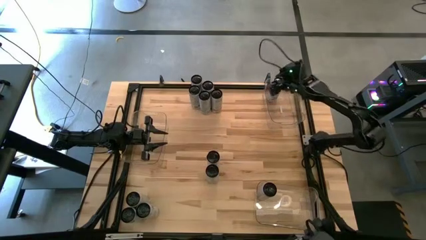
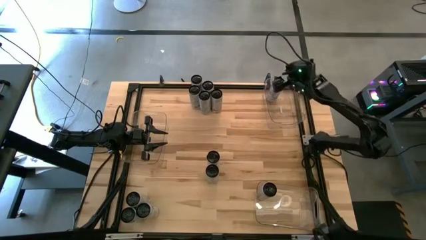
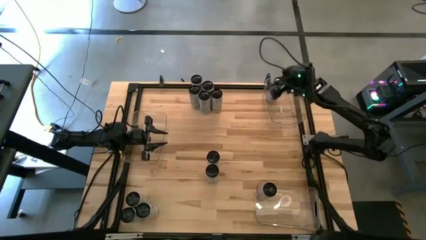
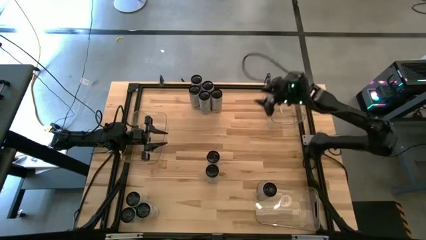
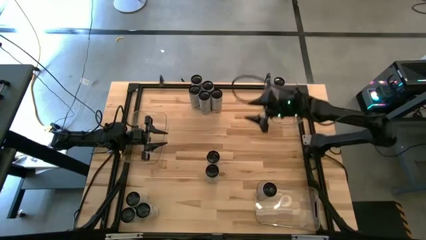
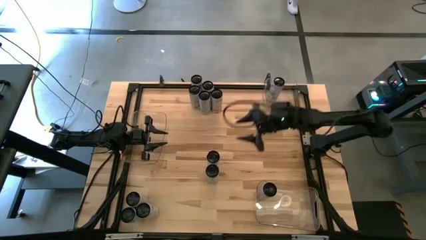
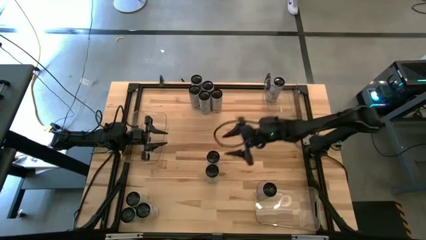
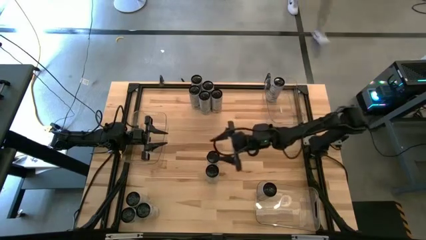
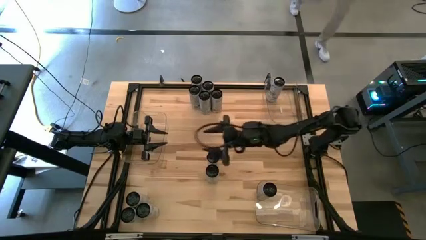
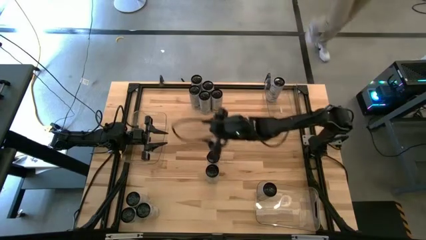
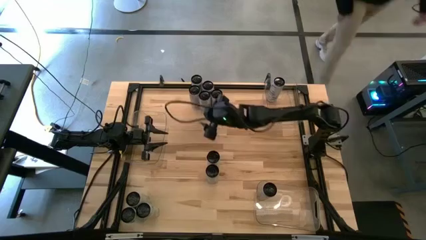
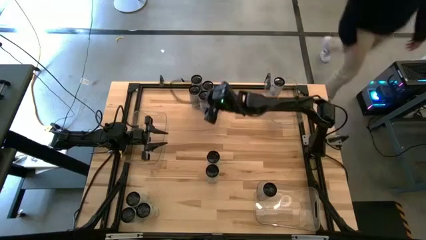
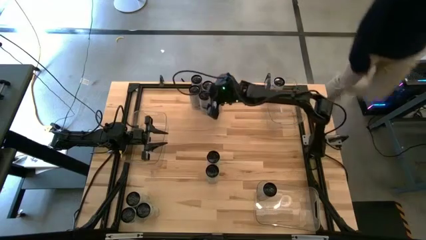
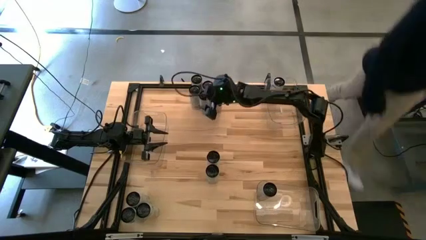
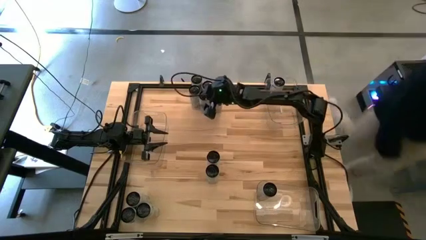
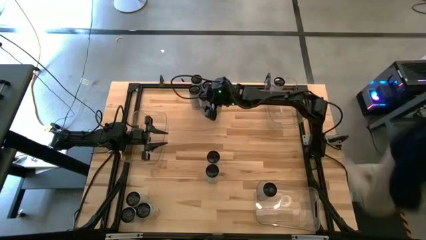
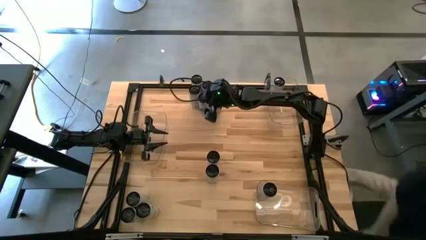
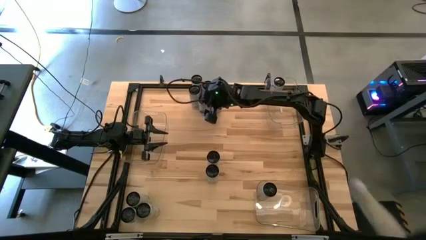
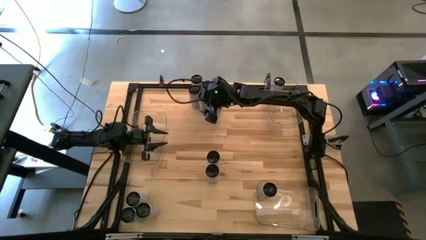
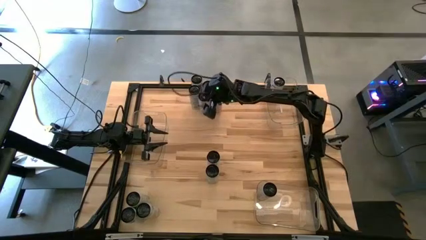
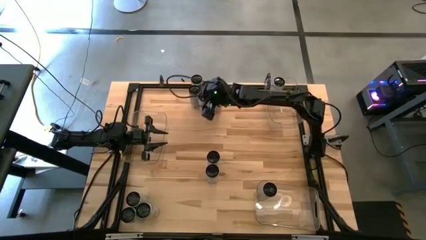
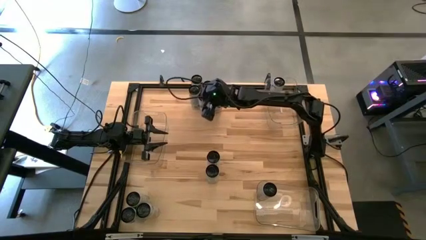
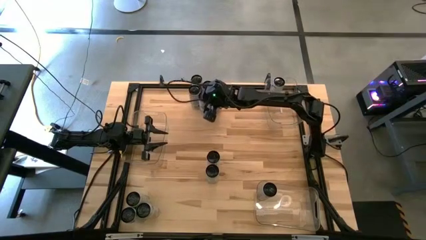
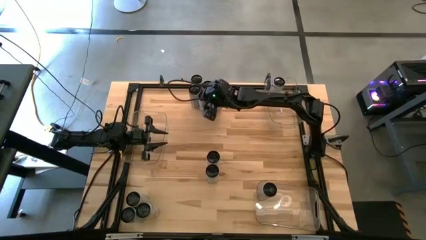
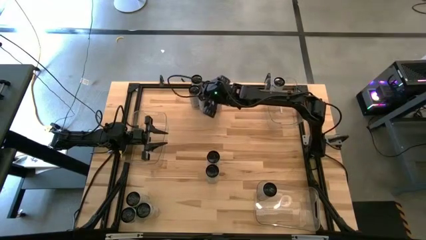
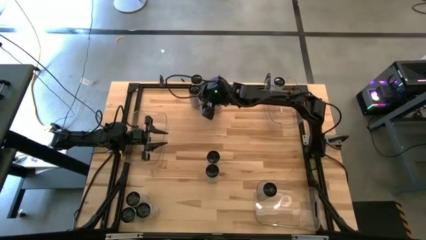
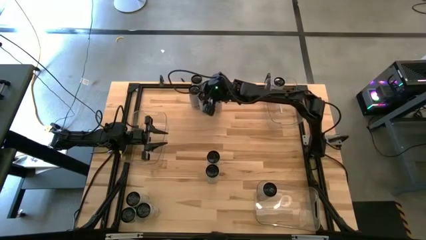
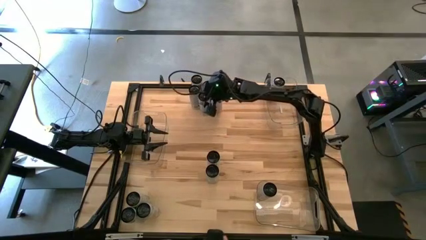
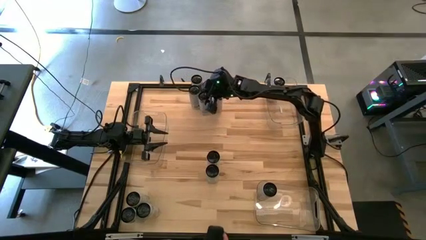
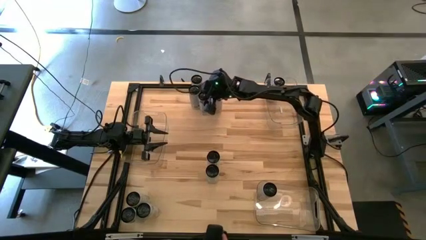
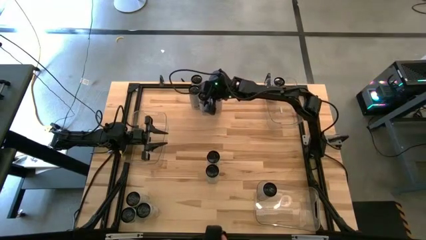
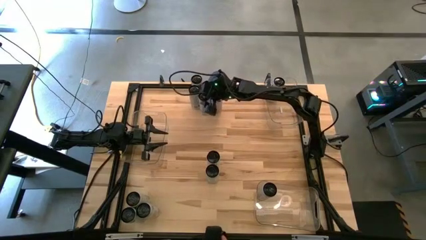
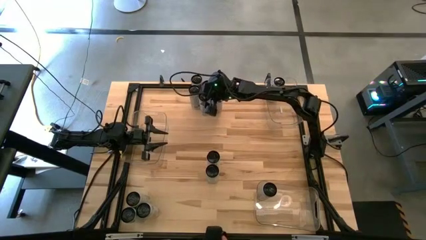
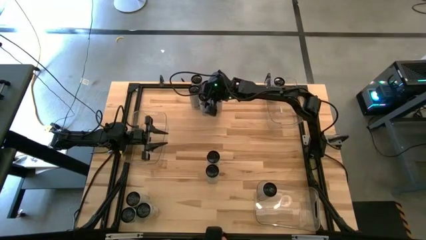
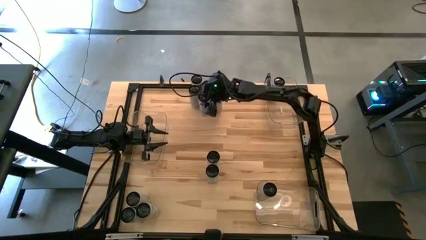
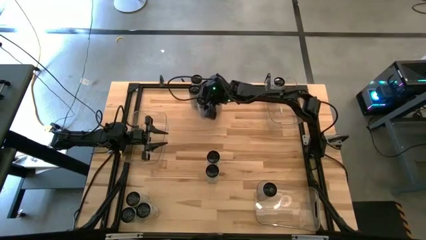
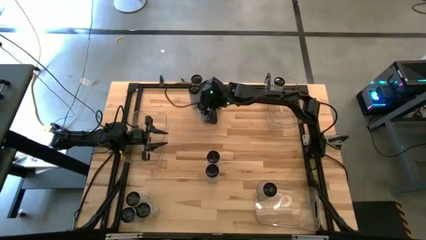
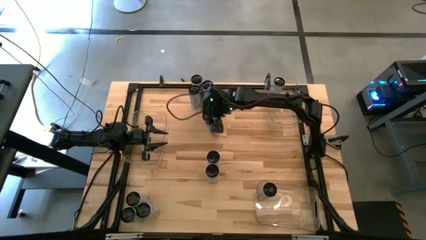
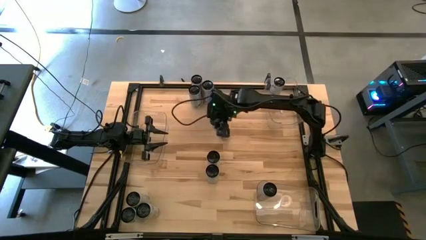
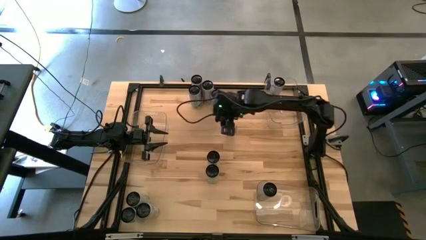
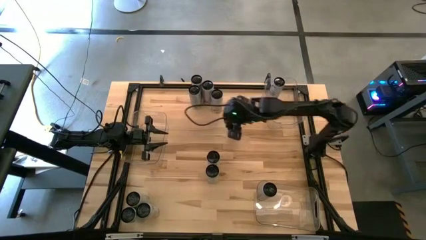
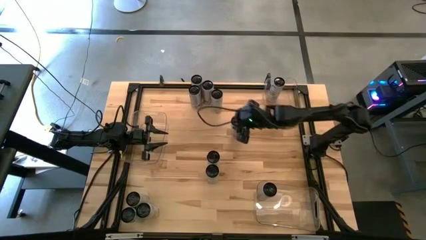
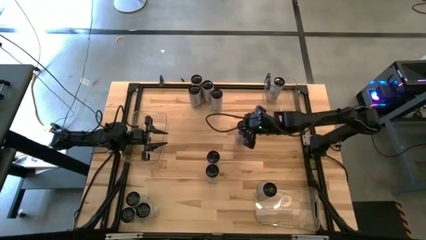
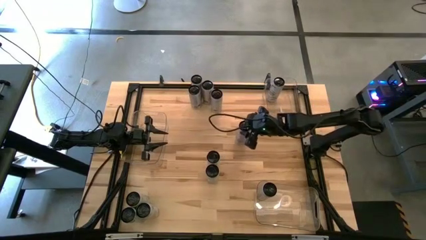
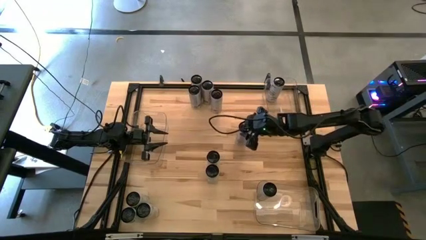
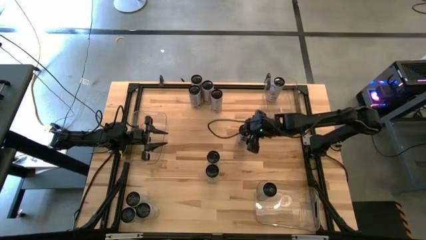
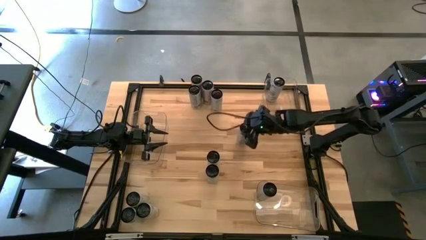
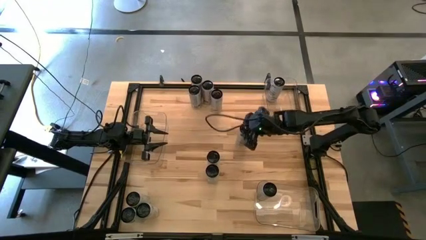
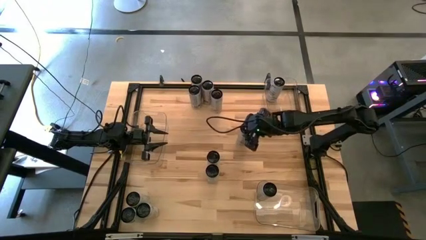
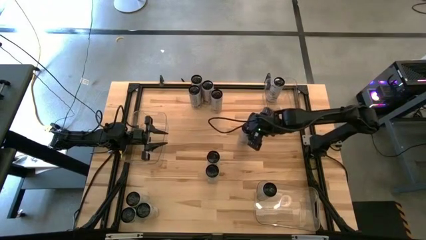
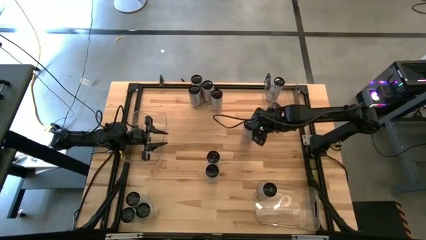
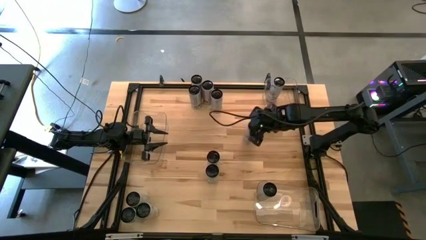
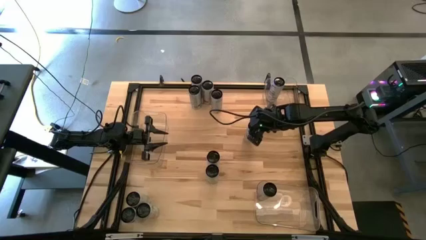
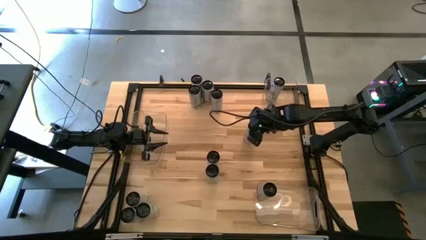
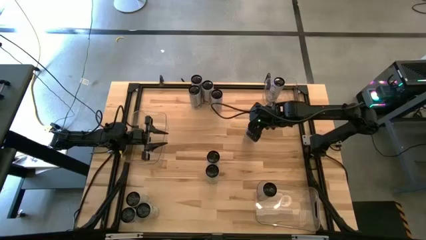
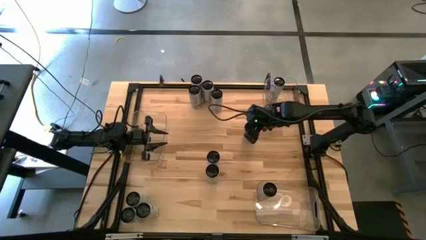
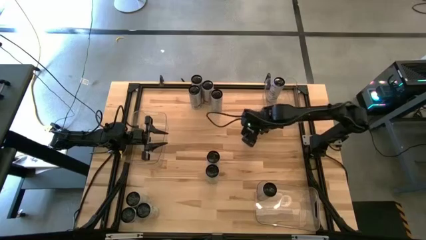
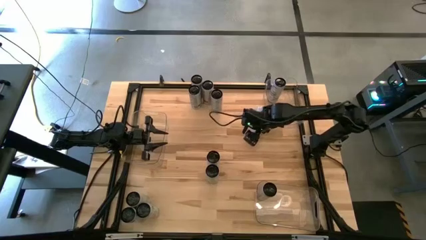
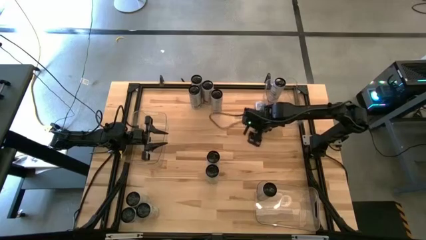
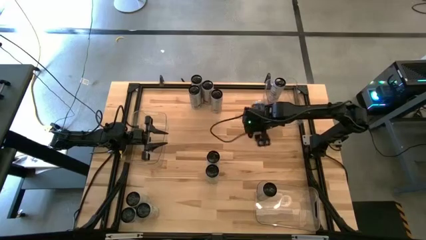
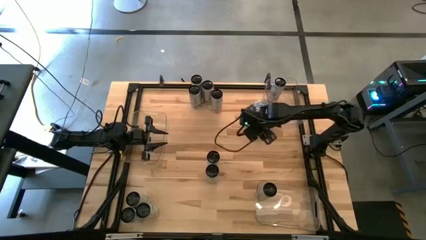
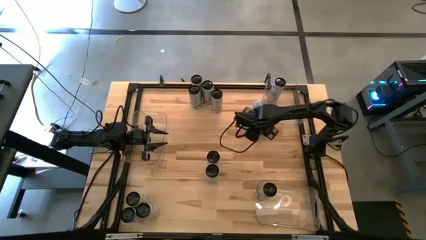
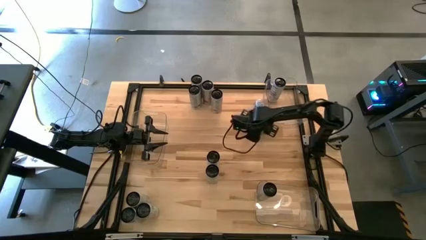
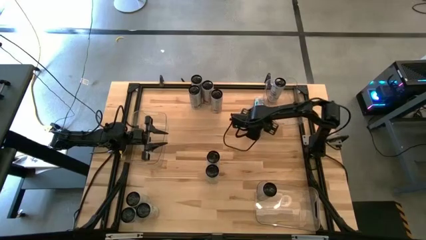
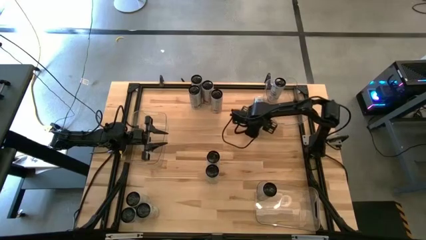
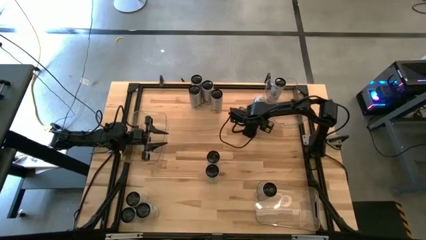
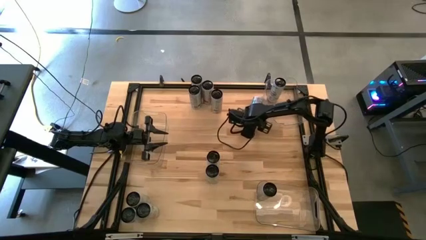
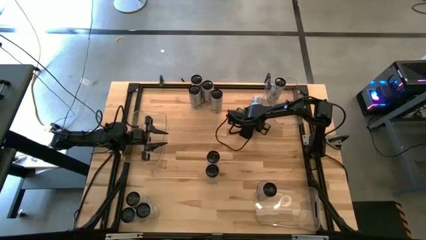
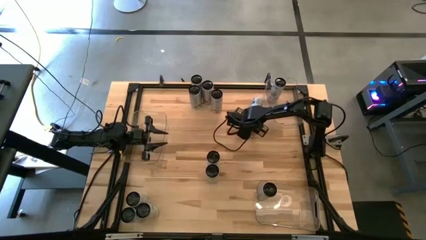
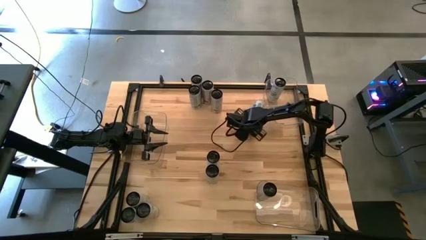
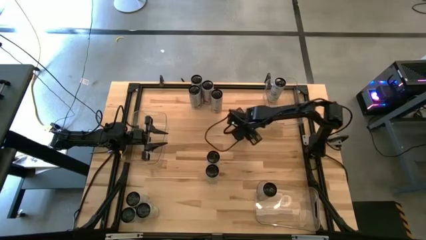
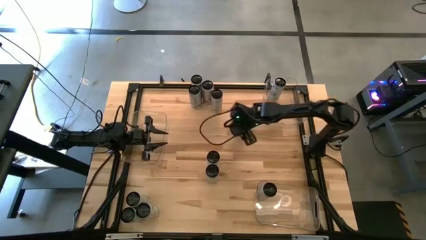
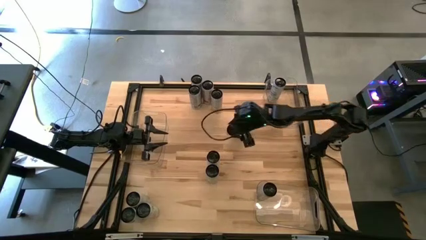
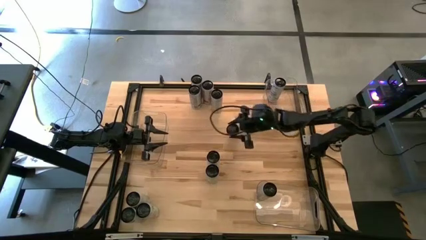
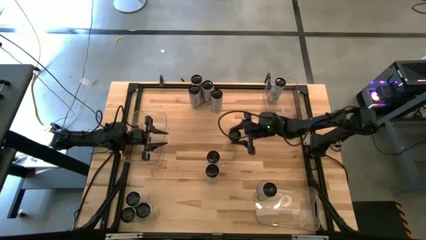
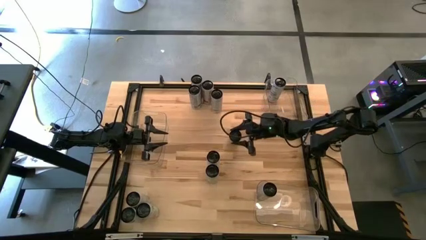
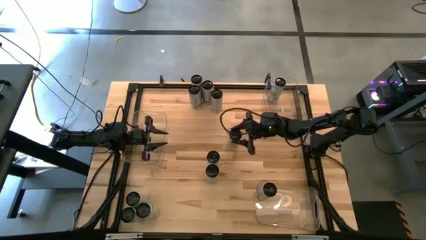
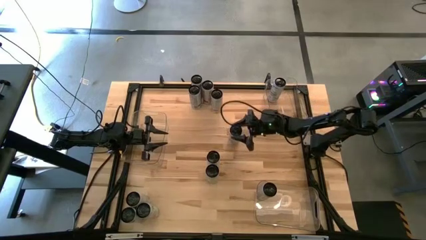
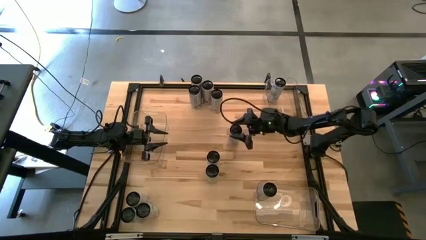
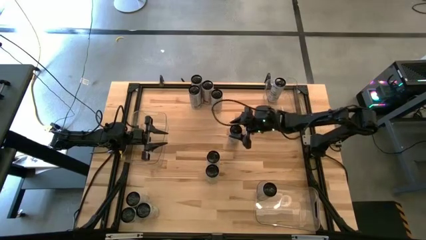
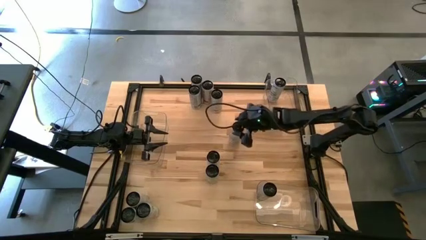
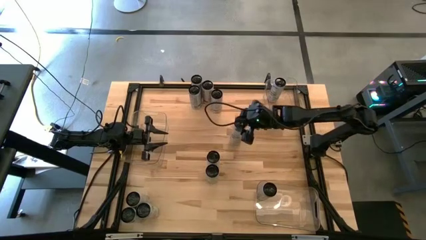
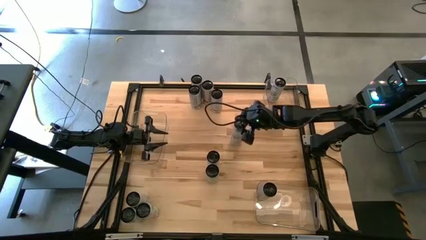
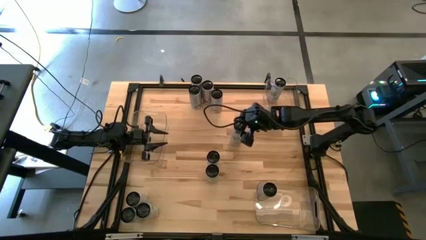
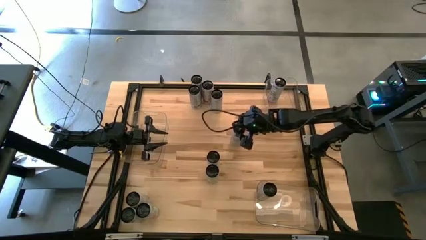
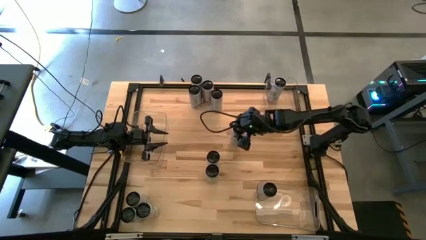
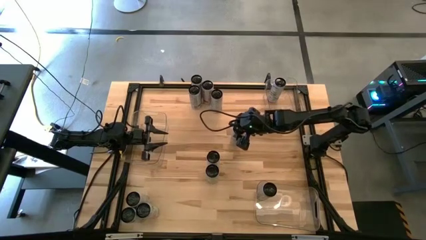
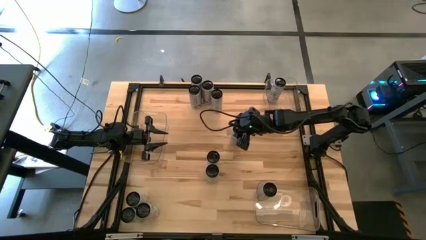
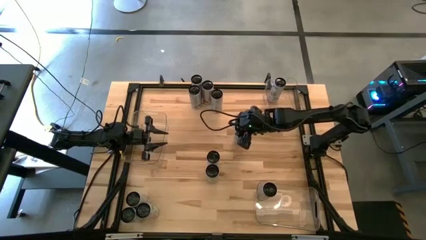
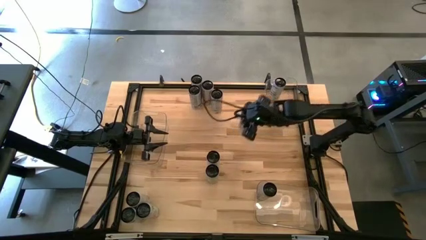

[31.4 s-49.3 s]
Task: Sort soda cans
Put the white-blue soda can into the top transparent bin
